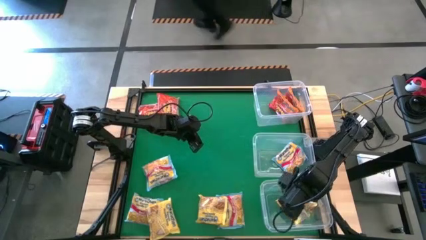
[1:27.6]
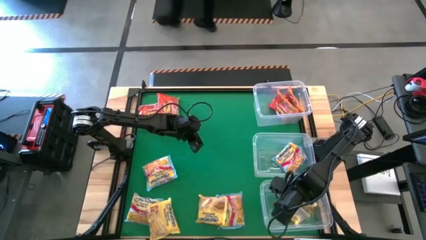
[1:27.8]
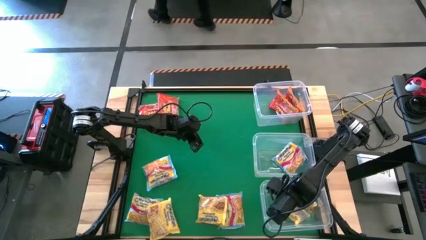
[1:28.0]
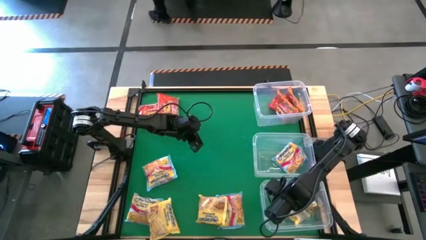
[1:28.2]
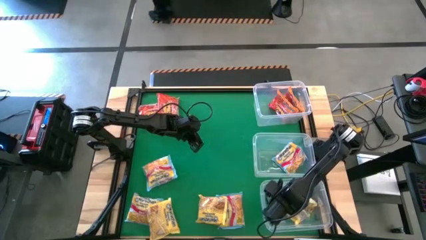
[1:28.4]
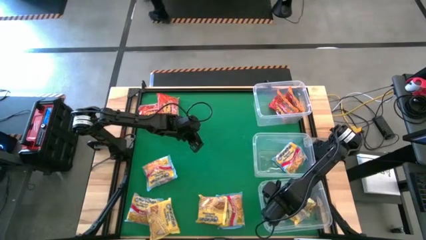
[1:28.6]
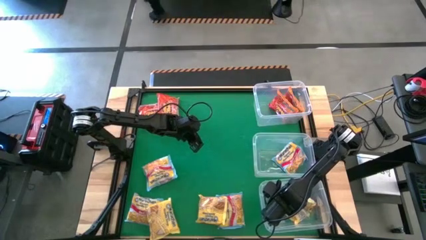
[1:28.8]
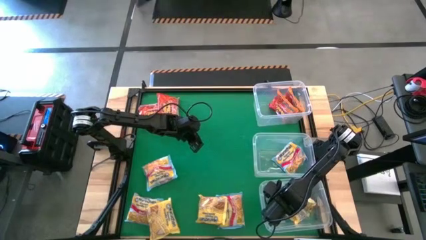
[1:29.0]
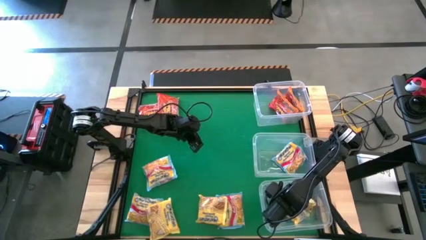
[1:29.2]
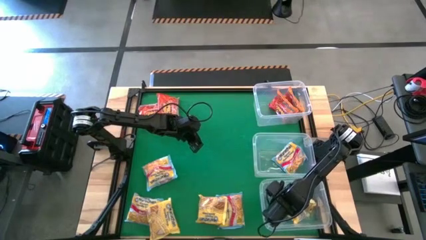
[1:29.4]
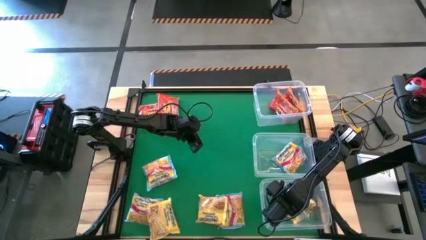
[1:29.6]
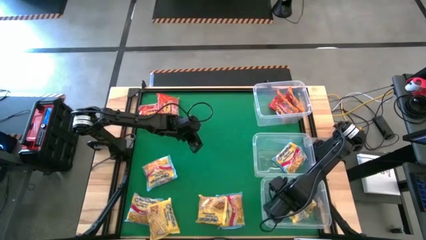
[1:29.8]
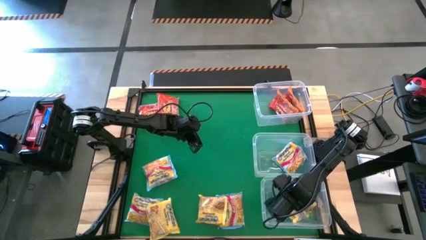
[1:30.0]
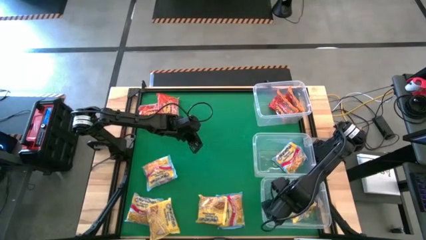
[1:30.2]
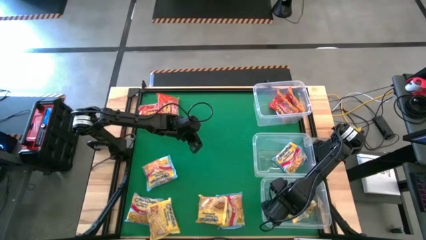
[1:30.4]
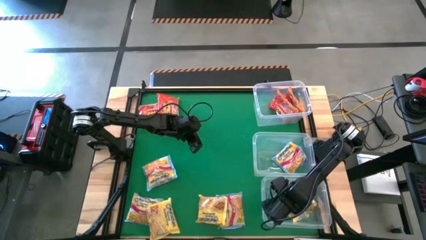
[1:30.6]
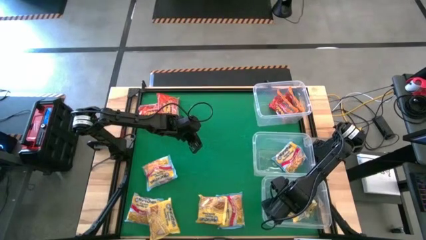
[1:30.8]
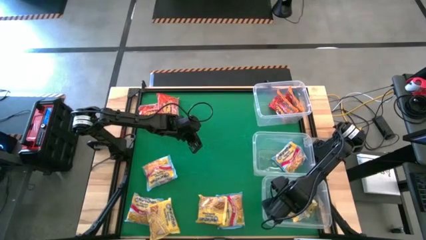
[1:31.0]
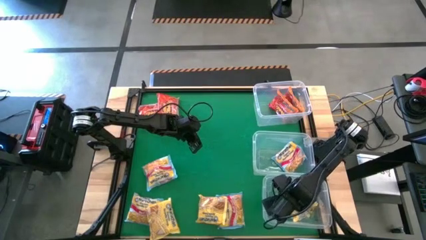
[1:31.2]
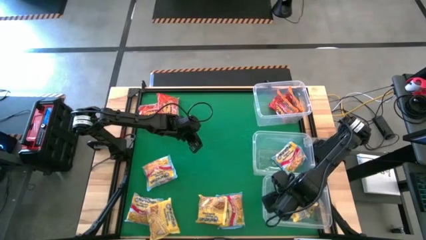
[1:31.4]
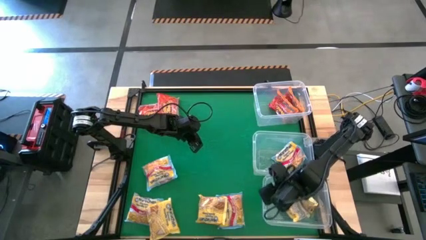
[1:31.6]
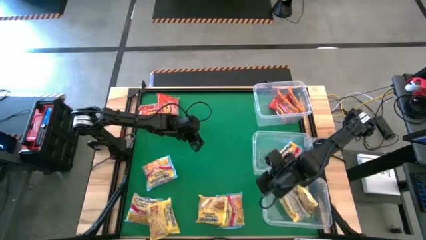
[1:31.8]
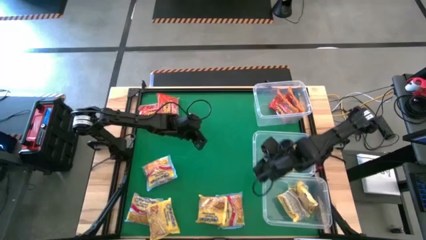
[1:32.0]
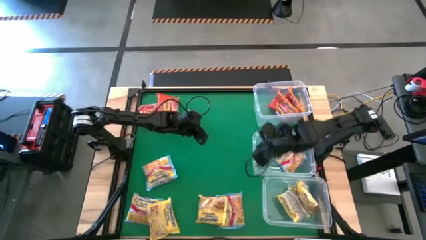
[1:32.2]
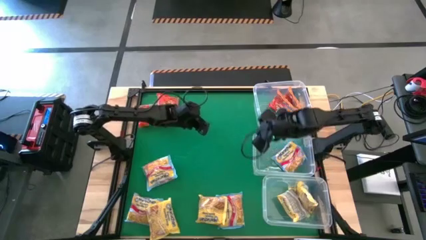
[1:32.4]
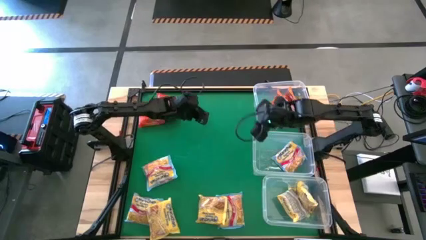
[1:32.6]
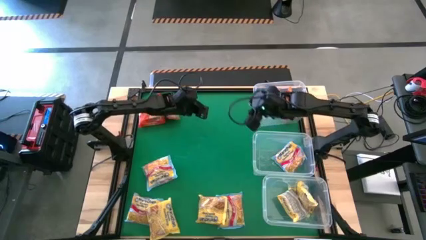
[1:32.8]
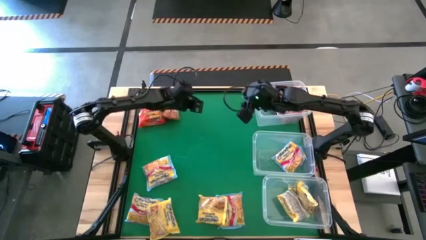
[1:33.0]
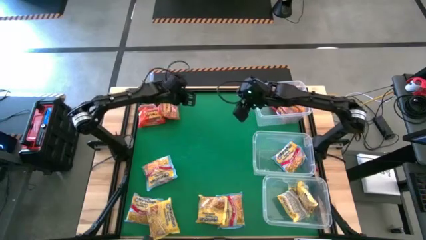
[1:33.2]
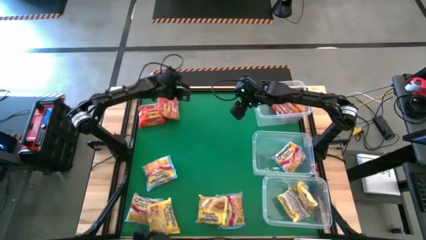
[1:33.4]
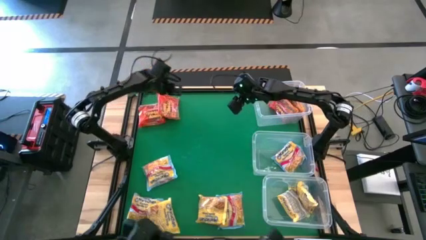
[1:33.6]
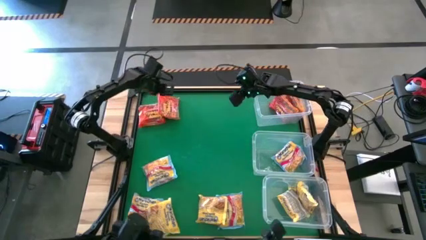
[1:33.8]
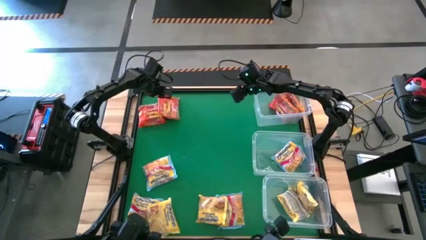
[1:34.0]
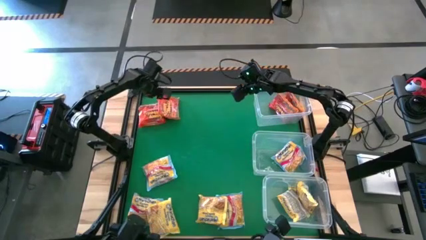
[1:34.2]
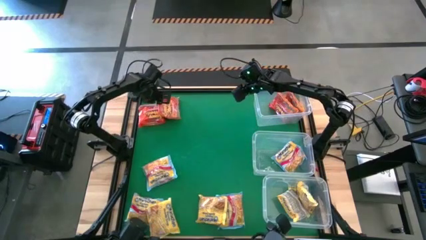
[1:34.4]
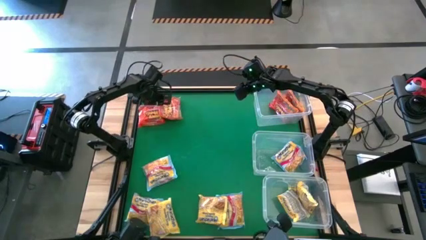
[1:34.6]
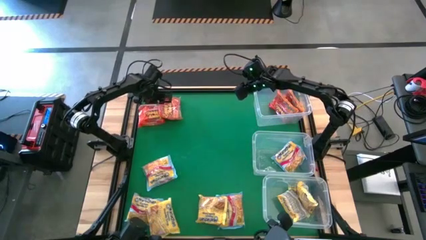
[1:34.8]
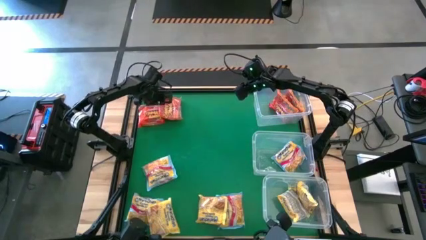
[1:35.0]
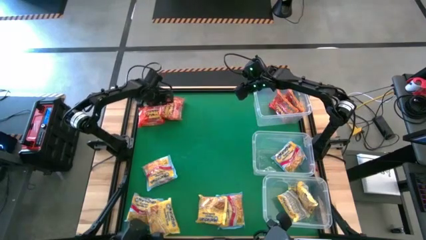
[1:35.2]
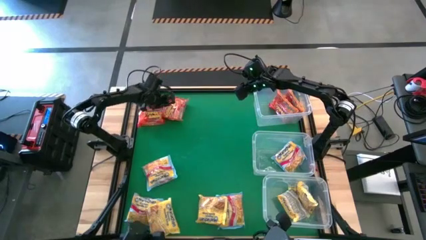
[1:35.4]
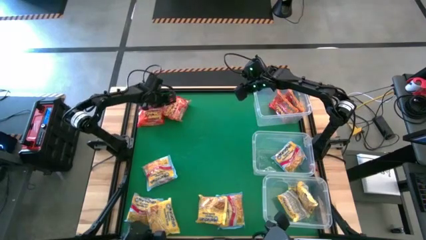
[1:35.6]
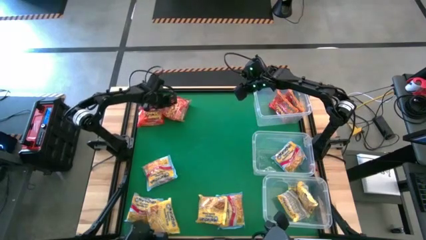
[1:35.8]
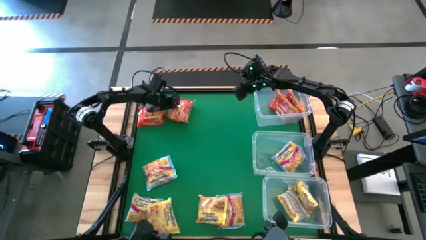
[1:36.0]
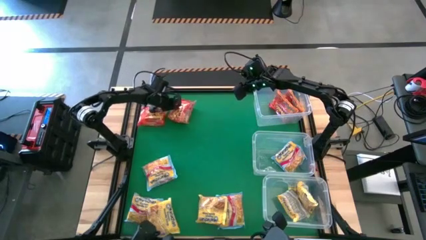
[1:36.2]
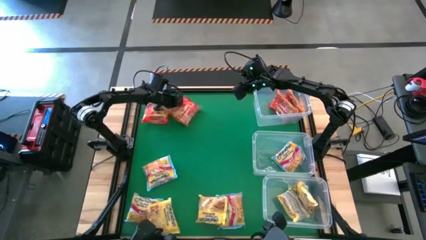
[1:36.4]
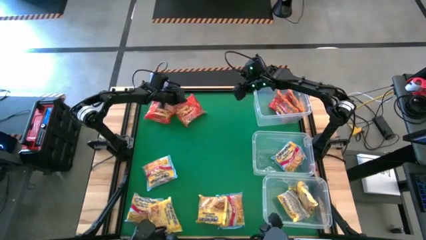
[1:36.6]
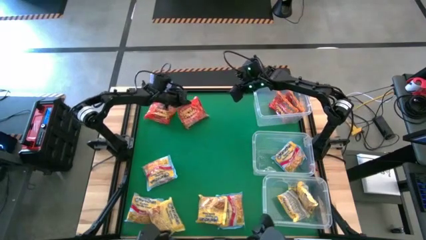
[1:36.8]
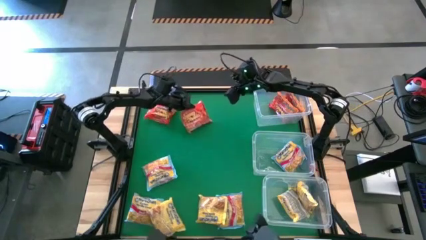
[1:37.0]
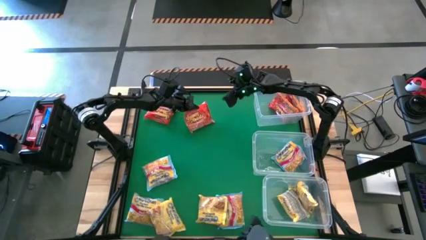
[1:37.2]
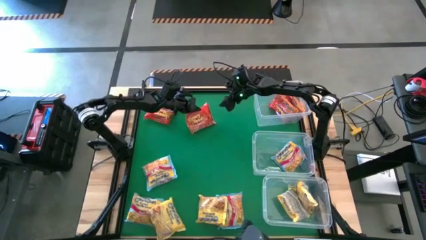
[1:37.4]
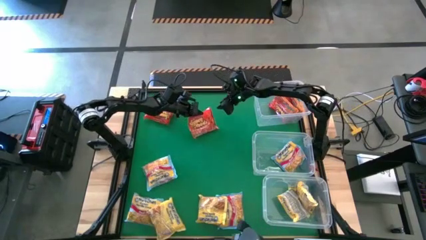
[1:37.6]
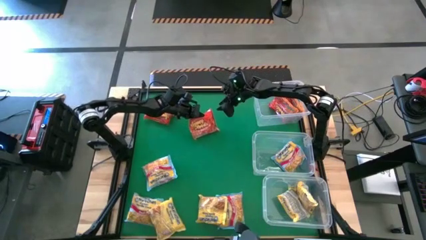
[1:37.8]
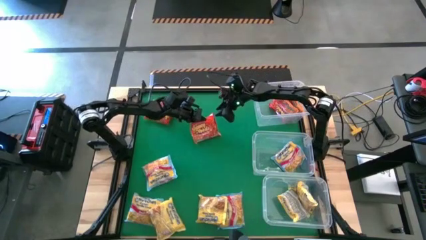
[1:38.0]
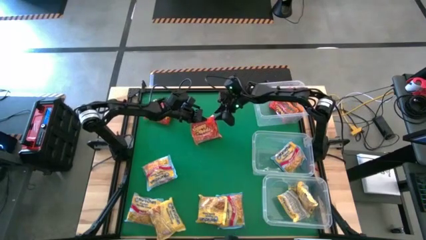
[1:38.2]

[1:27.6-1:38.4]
Task: Sort Maruchan noodles
Put the top right red noodle pack into the top transparent bin

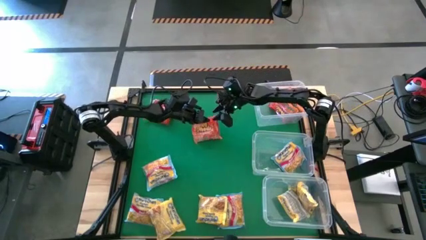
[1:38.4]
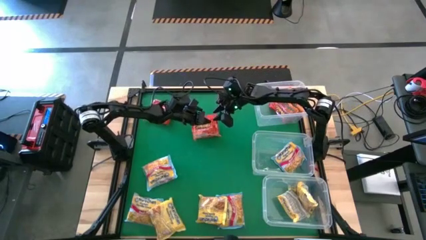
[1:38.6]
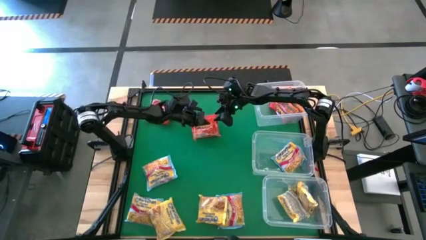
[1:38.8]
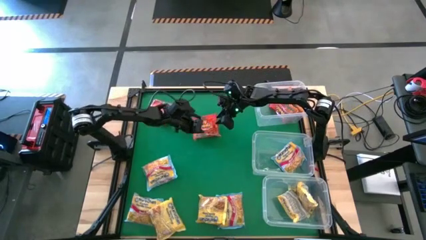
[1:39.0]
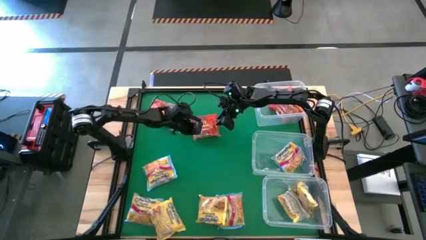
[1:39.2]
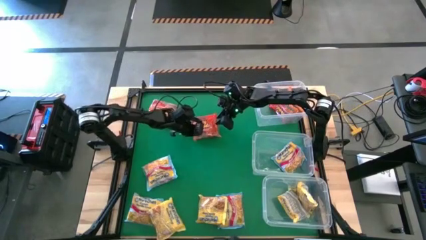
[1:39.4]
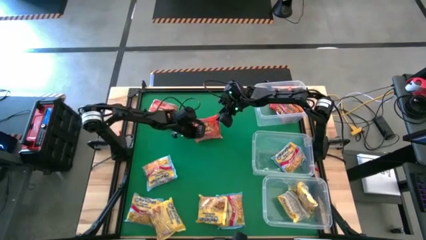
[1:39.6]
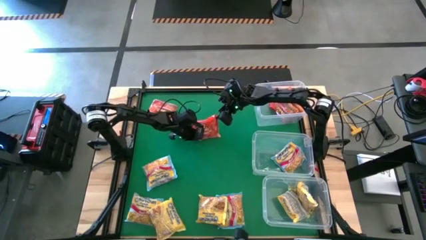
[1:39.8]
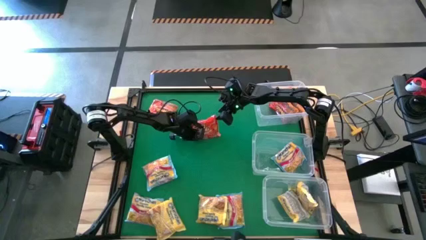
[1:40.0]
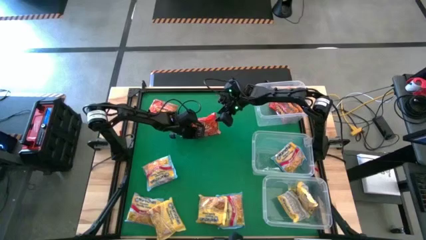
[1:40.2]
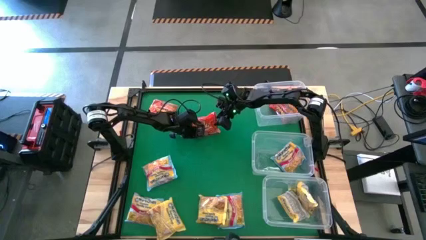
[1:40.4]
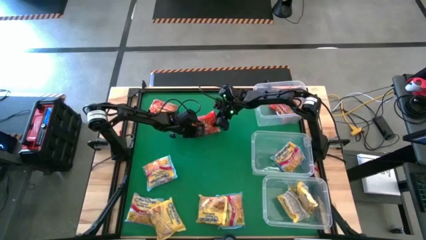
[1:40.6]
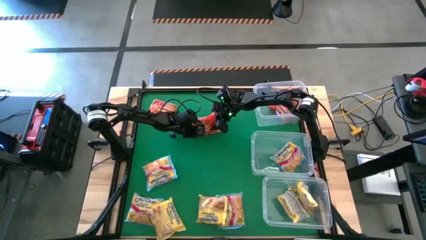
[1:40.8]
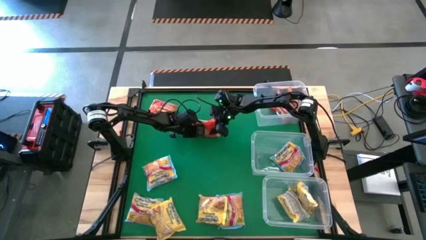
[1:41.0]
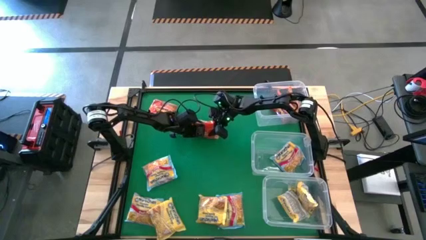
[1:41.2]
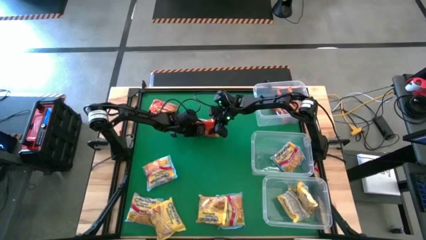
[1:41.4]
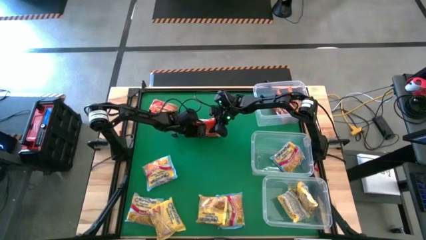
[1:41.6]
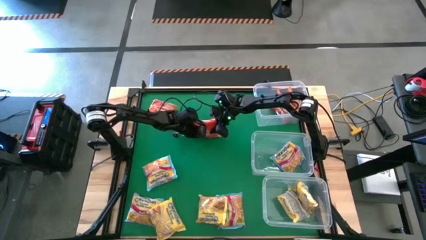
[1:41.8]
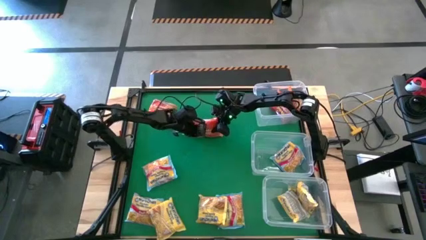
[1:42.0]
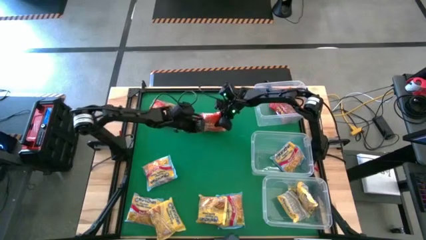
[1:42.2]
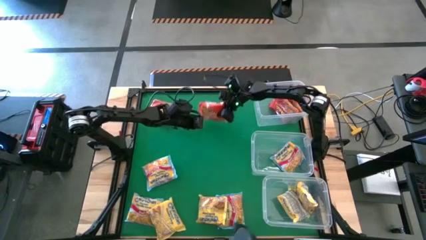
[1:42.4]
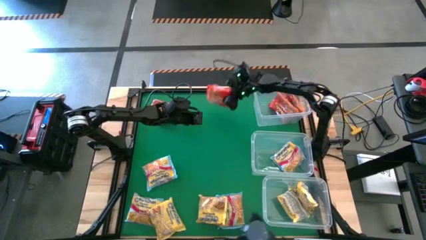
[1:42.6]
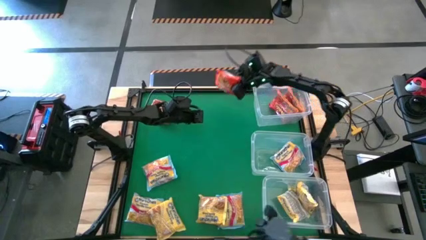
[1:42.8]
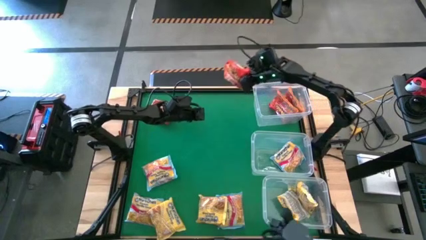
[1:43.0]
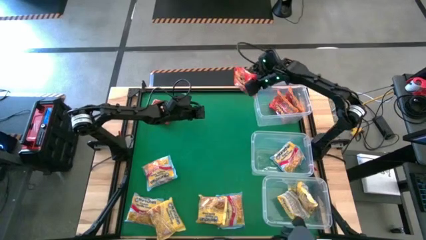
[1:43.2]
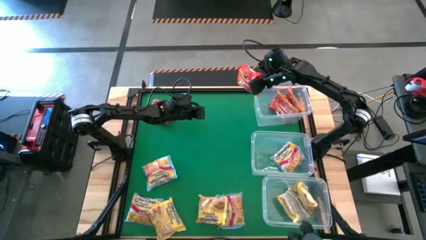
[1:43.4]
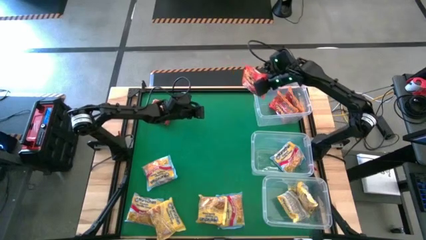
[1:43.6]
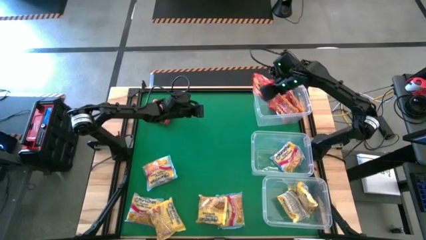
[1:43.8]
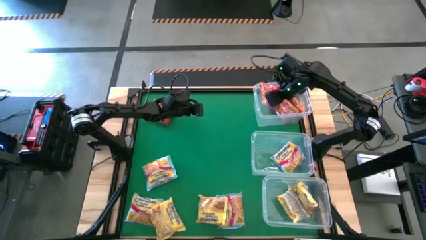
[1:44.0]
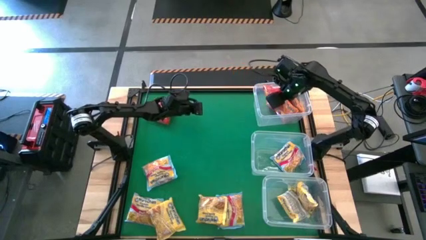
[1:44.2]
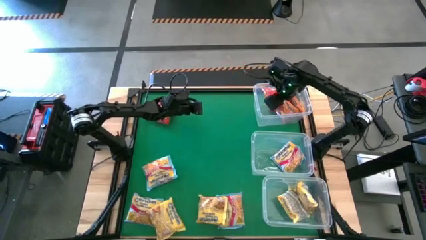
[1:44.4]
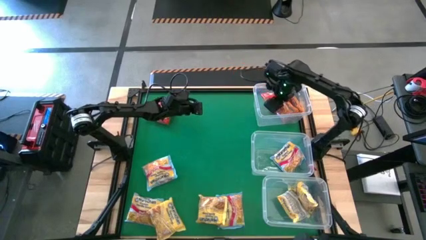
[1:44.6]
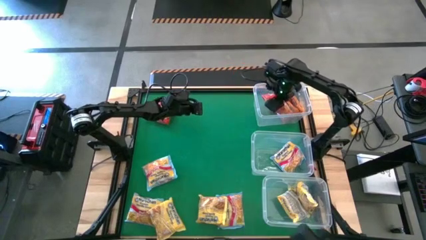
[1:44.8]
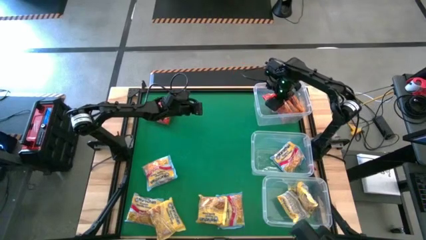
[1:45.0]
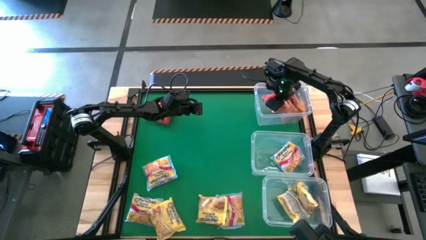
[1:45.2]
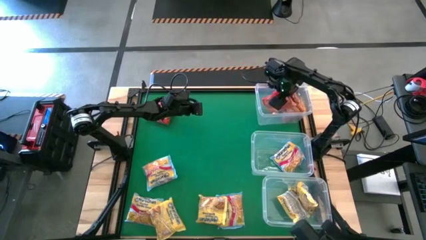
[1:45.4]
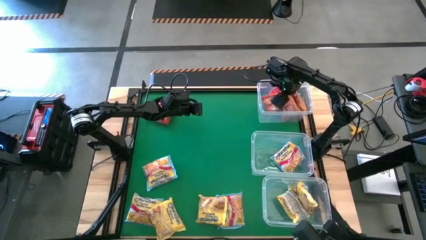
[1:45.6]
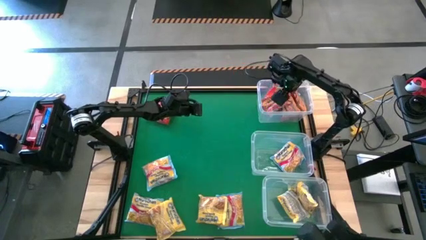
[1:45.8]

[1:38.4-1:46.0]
Put the top right red noodle pack into the top transparent bin
